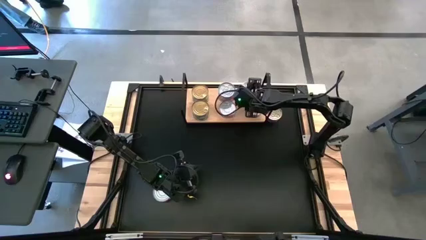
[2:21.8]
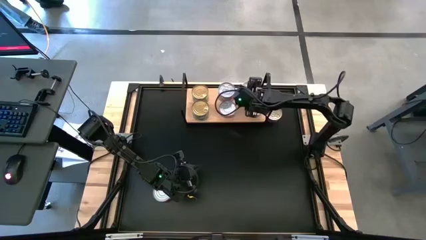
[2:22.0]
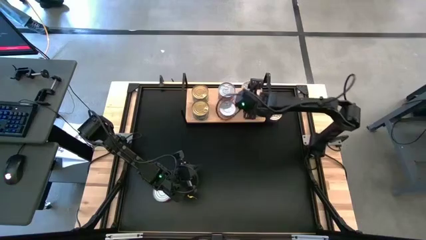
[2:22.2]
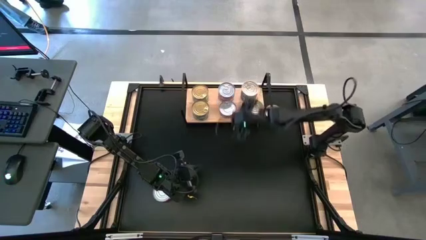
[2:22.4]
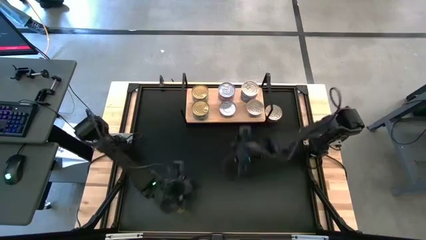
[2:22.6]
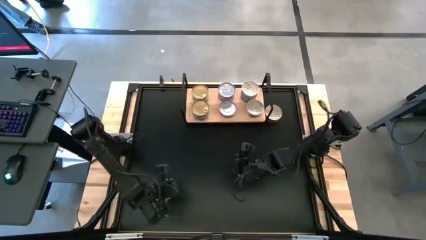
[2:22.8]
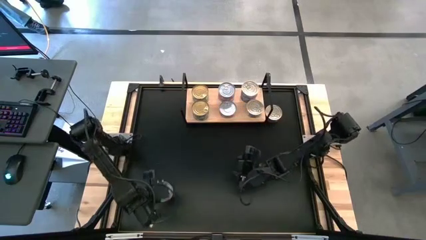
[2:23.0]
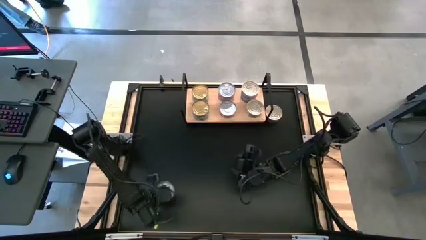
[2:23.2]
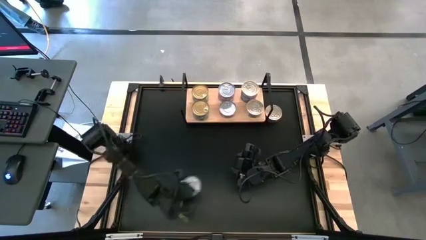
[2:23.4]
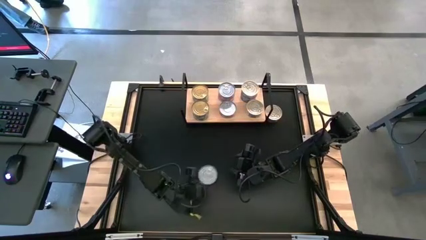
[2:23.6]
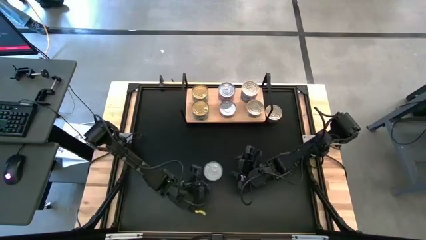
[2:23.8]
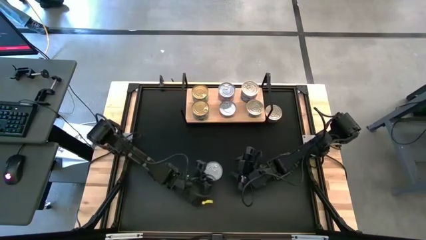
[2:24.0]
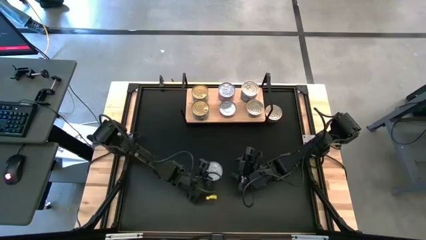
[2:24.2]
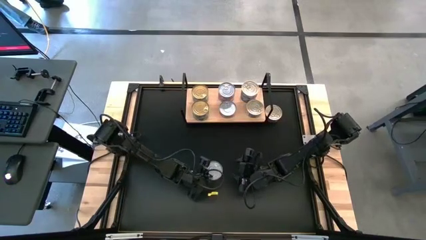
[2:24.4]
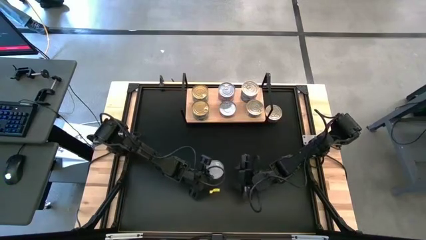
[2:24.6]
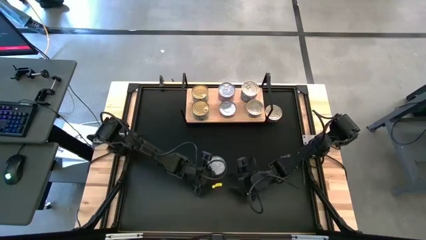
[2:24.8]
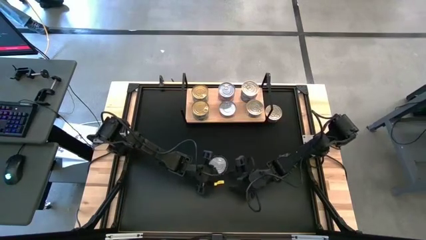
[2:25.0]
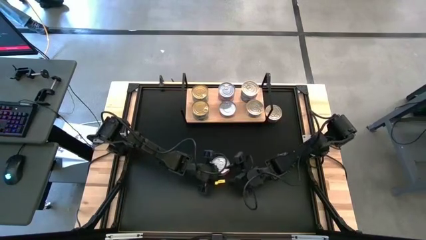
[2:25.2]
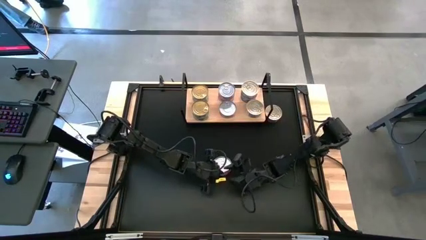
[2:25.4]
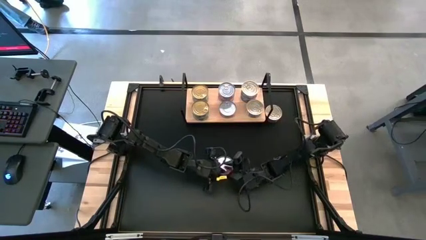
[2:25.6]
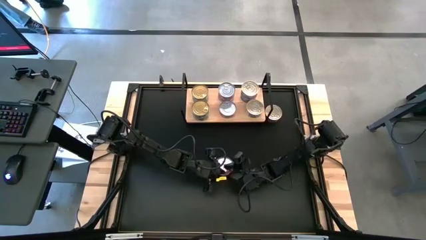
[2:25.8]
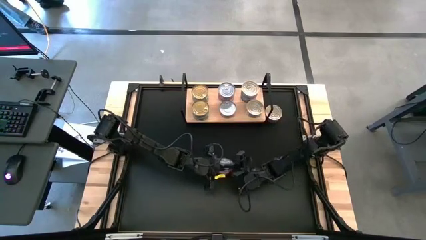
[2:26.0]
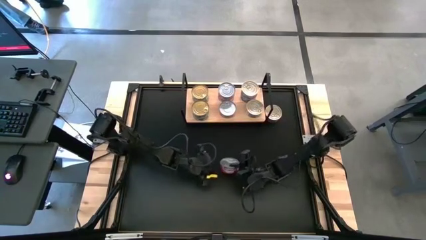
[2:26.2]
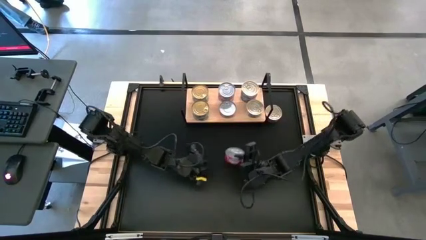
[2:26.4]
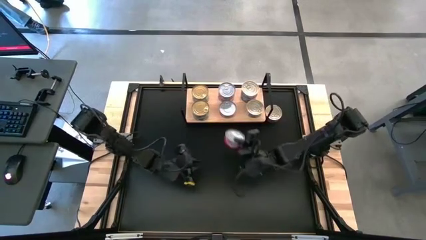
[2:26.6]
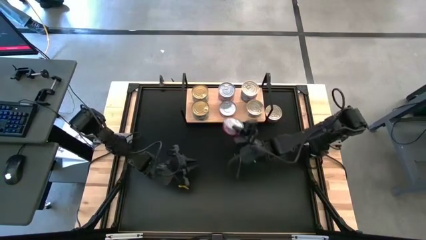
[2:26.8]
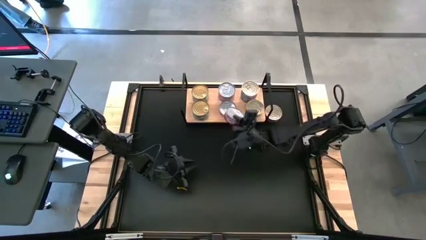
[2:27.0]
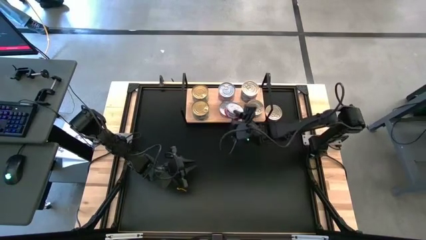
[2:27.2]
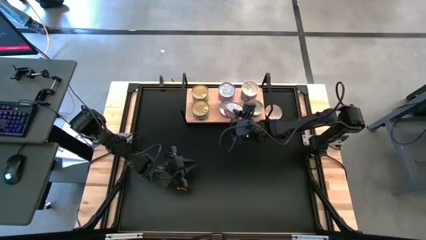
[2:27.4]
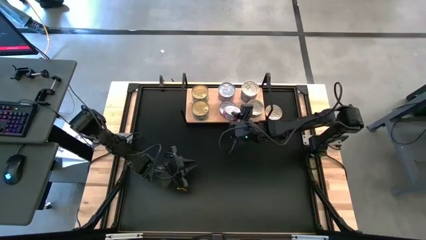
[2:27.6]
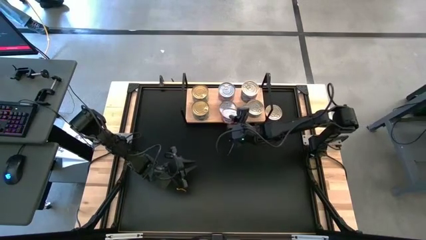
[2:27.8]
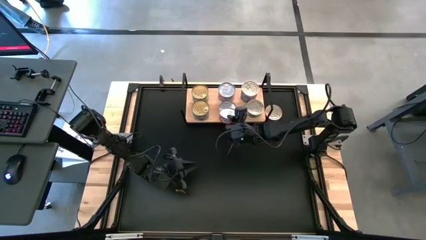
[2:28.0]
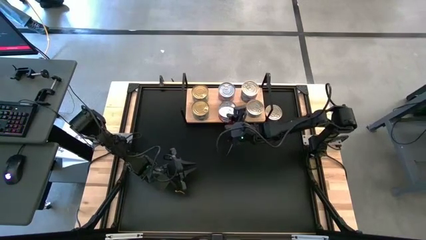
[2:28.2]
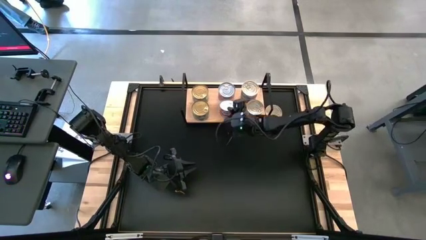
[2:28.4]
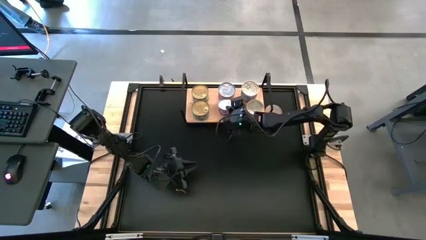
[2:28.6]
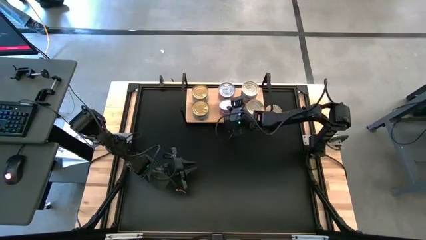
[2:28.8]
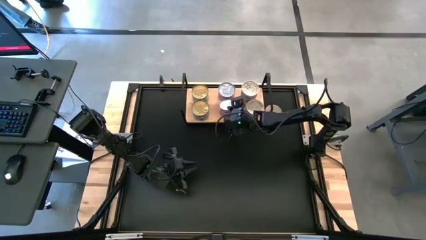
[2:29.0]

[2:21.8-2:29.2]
Task: Stack canned seafood by type on shelf
Stack the red tuna can on top of the red tuna can

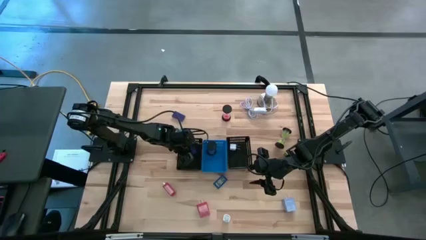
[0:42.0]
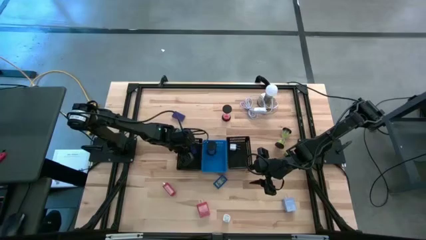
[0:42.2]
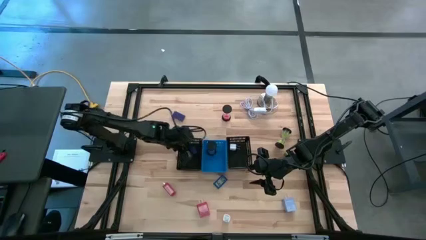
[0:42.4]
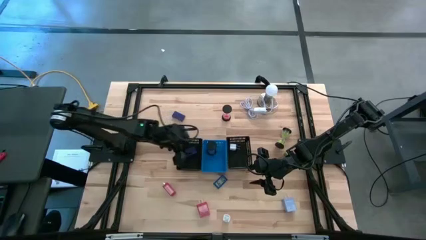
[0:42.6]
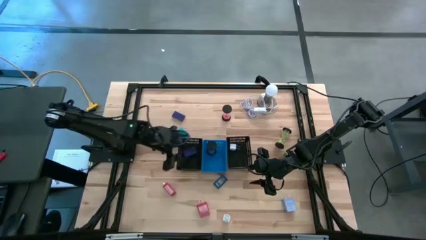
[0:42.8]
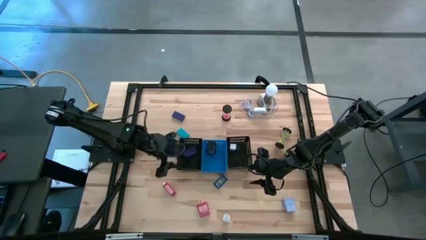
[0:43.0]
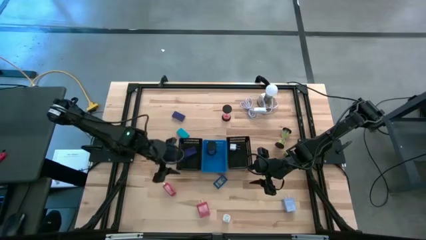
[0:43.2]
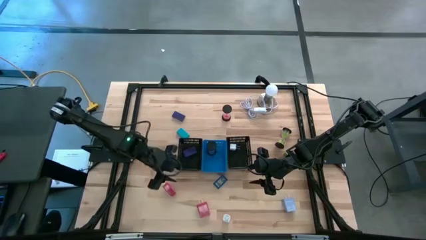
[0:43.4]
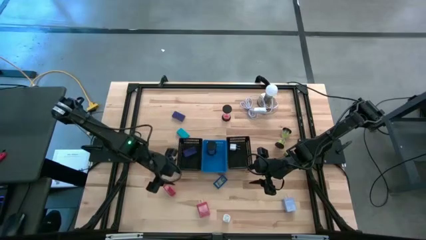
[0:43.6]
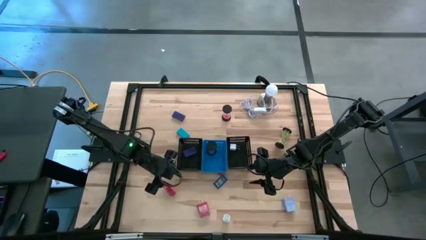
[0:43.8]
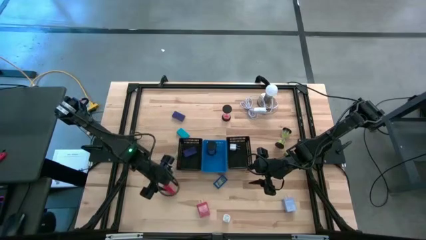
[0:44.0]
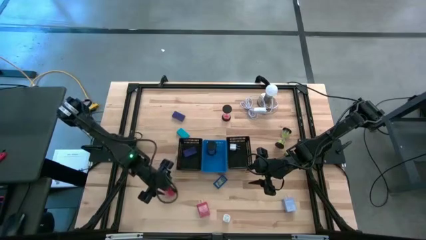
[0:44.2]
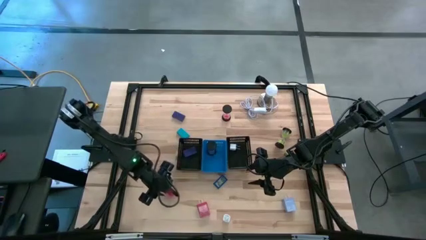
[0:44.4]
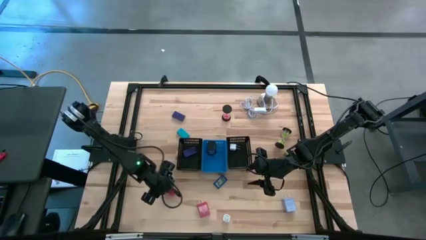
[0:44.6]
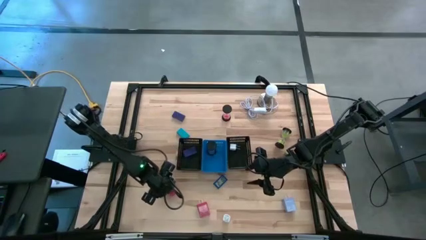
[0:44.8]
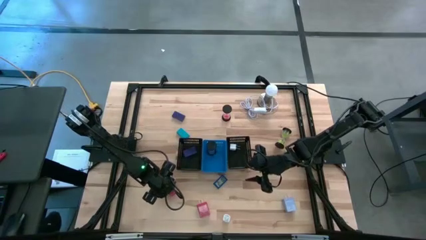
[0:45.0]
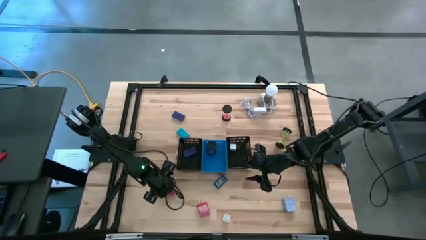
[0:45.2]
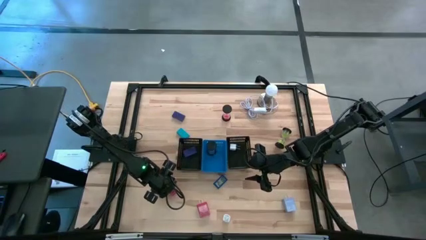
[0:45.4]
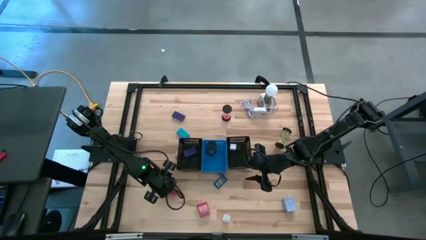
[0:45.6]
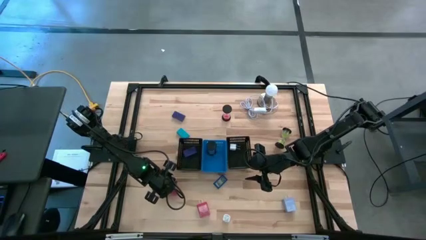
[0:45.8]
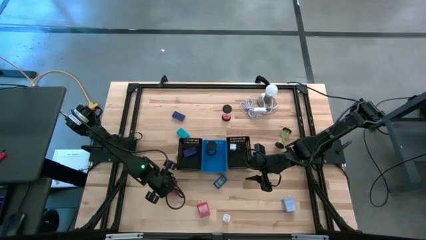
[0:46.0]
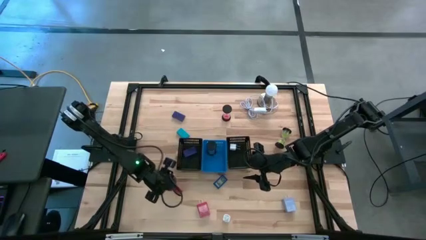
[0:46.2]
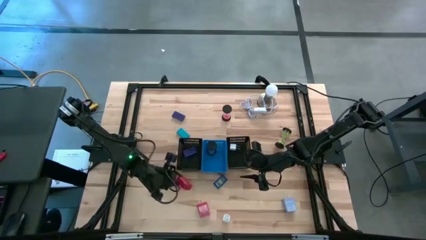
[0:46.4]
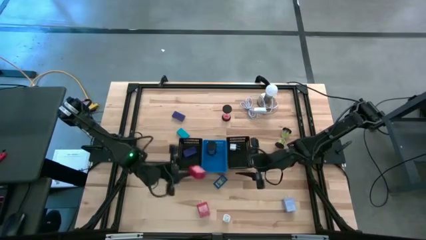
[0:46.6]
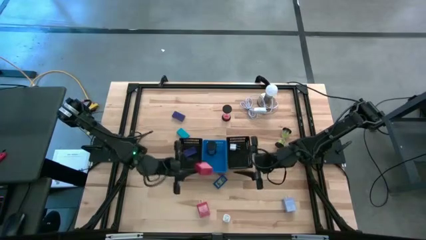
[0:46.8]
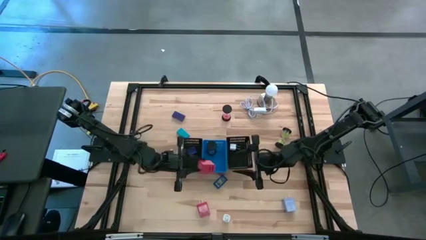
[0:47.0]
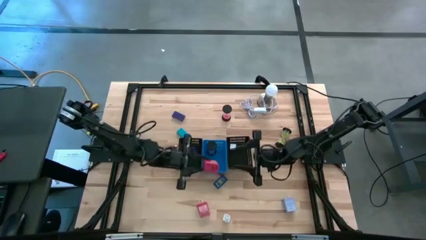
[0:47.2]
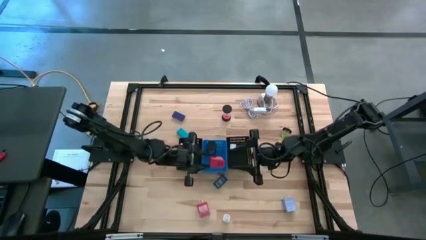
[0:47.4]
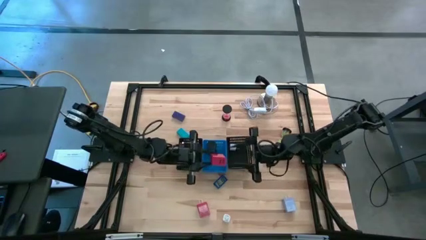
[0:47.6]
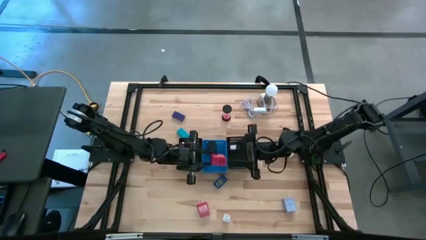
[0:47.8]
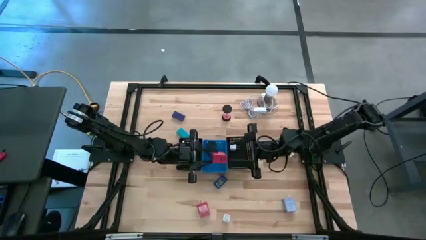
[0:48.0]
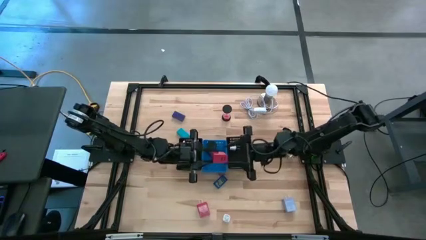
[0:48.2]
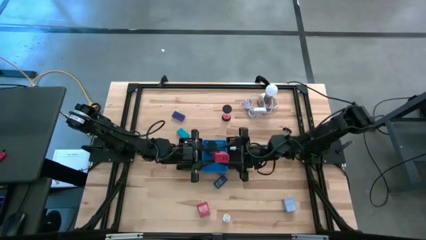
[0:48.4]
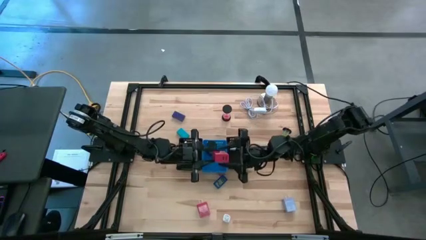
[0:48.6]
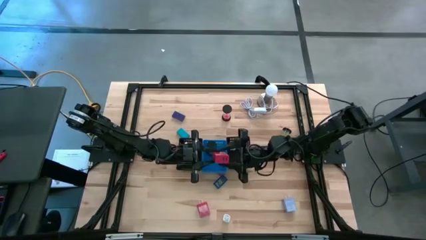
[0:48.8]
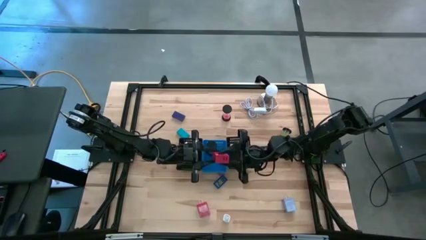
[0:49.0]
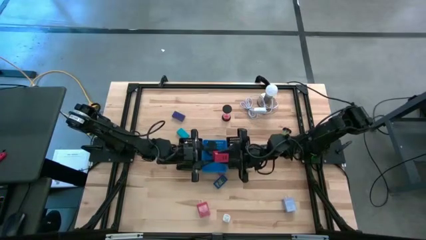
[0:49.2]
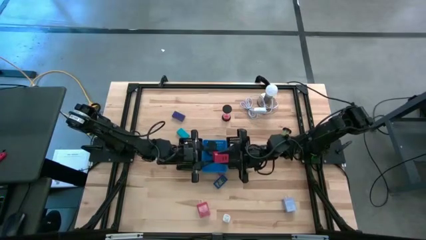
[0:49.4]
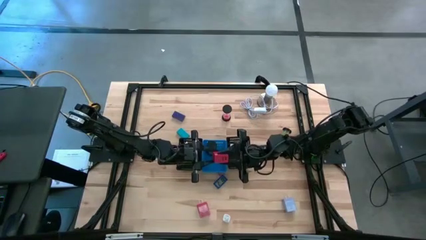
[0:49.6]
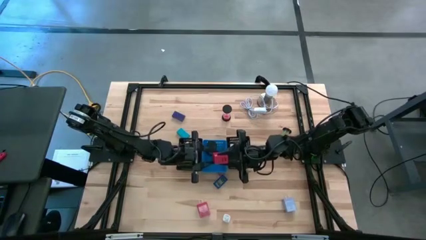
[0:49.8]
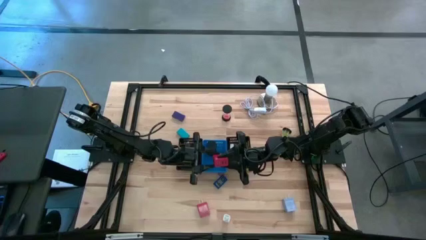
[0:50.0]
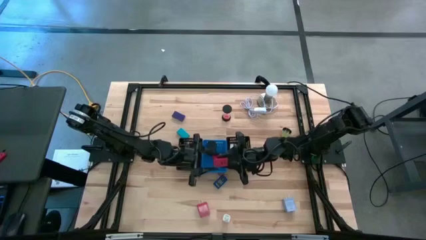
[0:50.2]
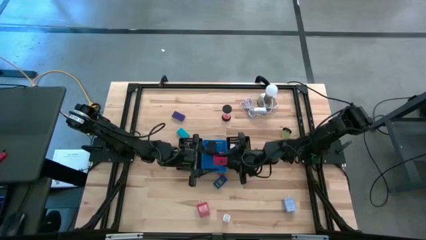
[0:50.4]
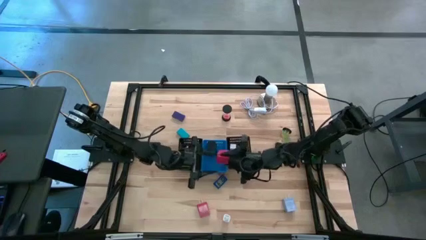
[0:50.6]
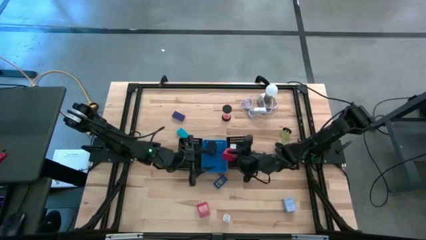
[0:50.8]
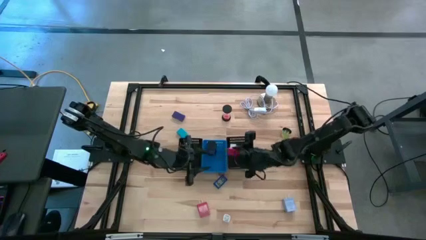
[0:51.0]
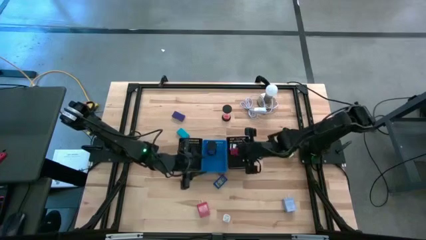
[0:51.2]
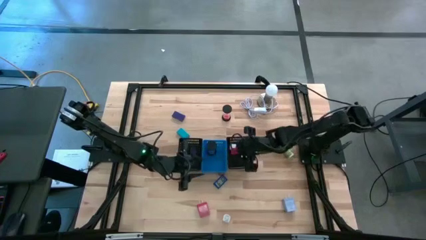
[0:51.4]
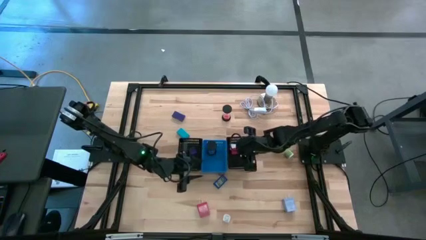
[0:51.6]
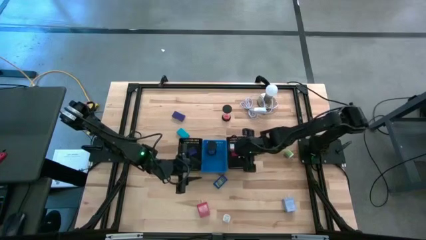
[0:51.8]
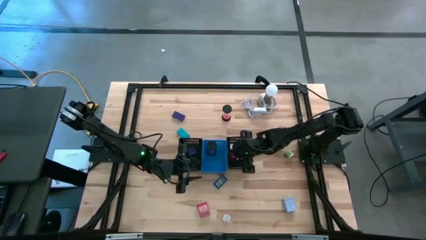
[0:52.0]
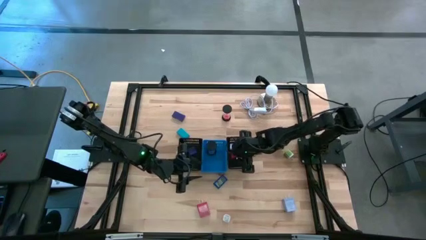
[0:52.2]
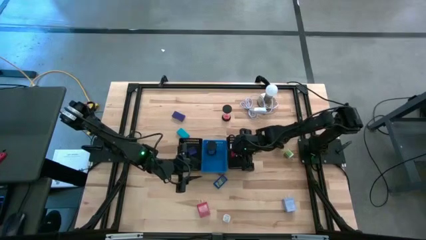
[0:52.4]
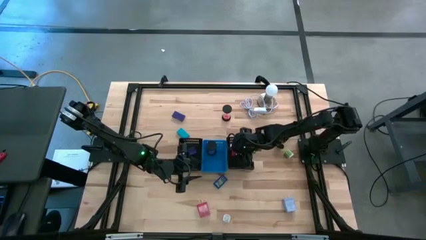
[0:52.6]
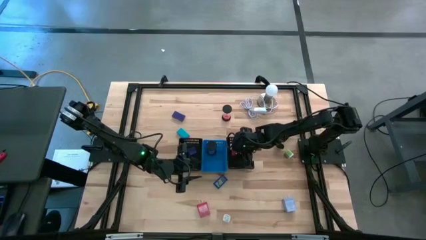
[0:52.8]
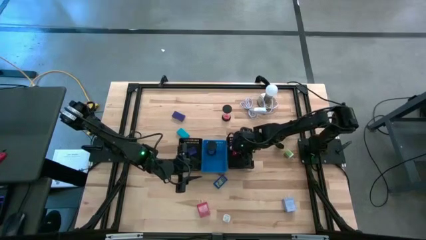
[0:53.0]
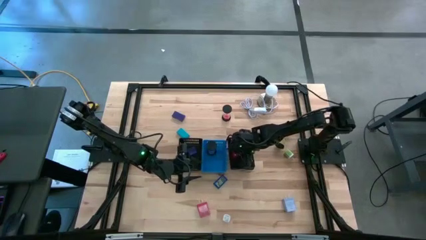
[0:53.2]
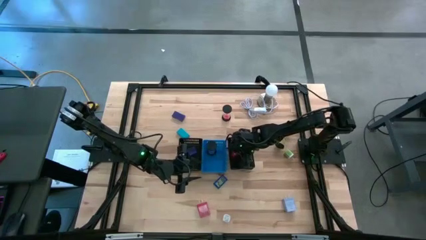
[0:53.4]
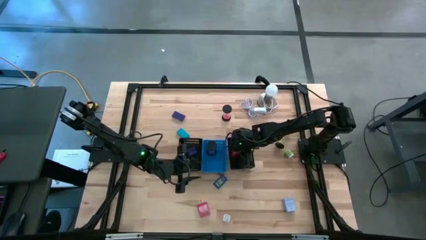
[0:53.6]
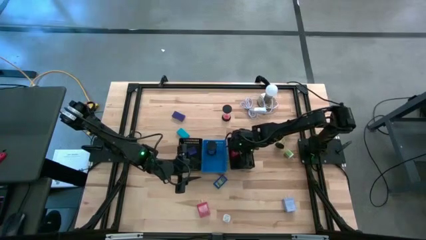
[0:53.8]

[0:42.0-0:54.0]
Task: Pick & Place Office items
Put the left red charger adapter into the right black bin
